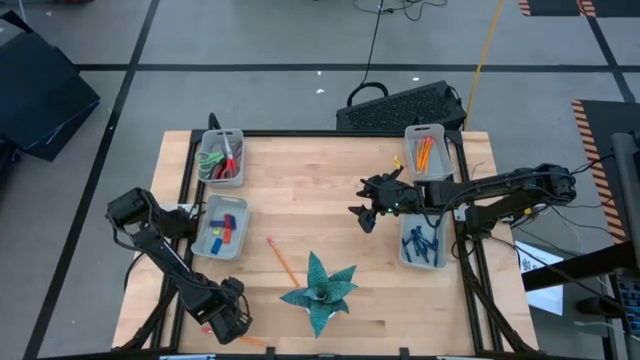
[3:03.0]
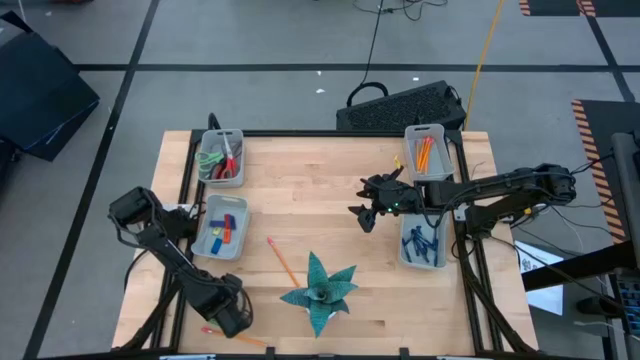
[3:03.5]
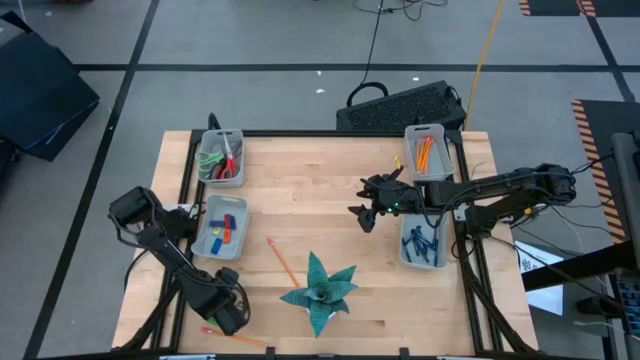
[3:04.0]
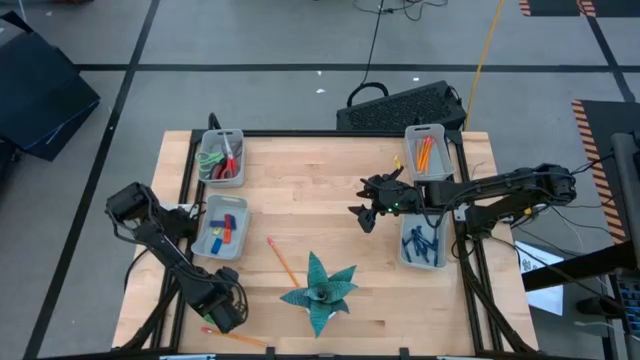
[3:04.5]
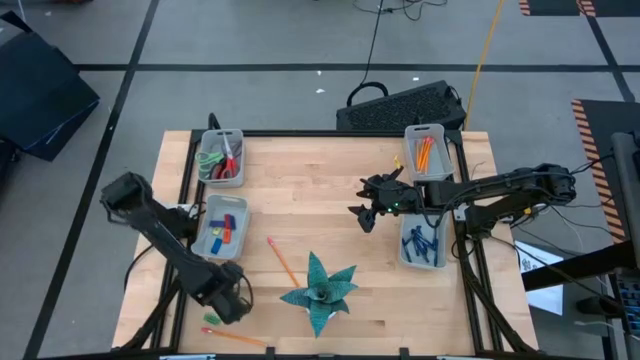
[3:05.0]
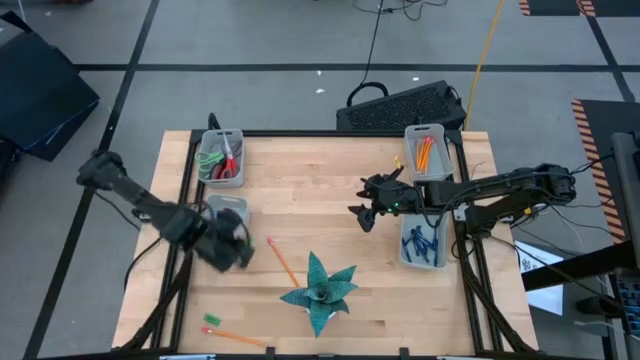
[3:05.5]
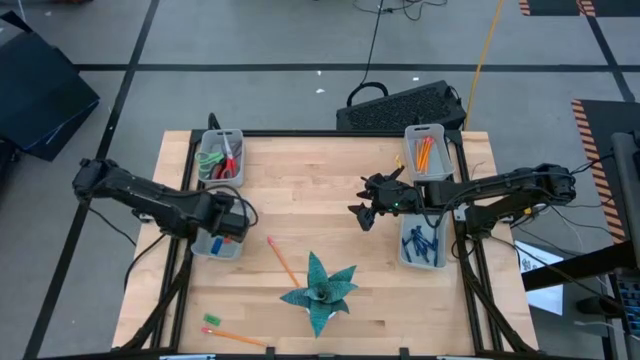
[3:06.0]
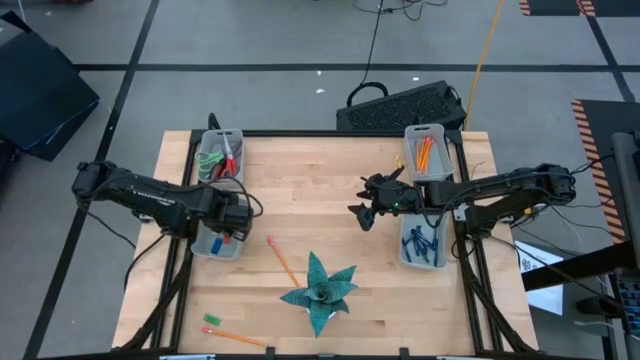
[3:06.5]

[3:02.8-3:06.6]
Task: Sort crayons/erasers/pens/pencils in bins
Put the top green eraser into the bottom left gray bin

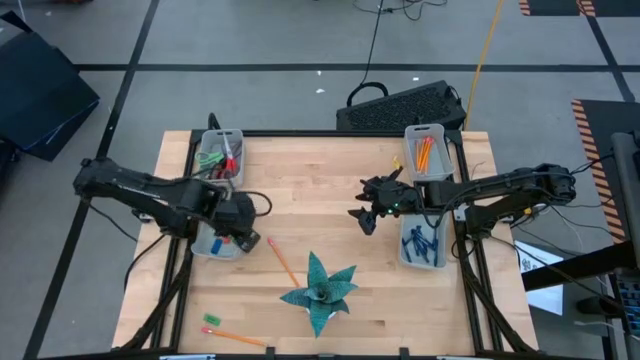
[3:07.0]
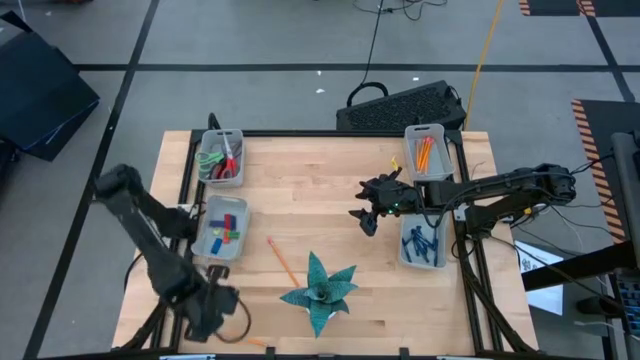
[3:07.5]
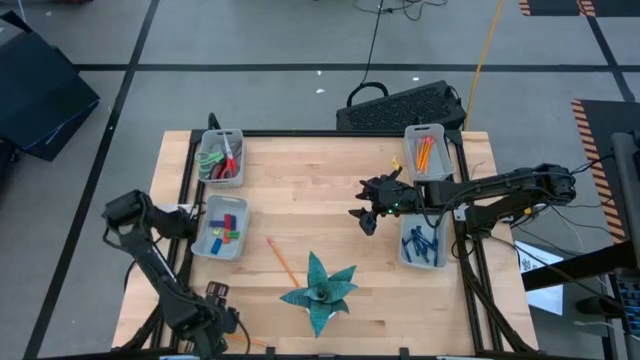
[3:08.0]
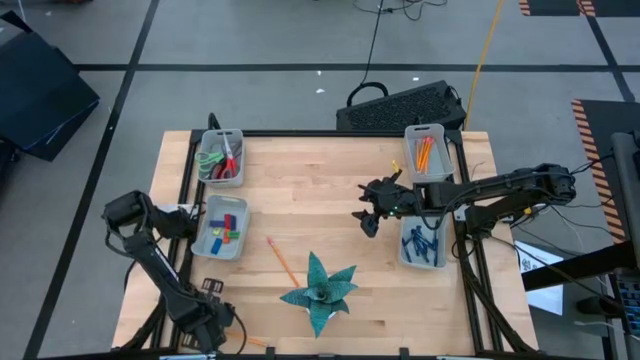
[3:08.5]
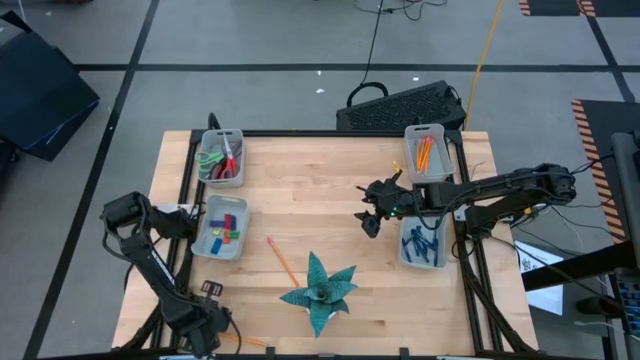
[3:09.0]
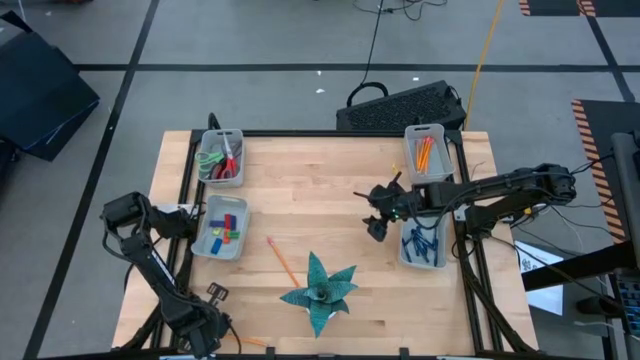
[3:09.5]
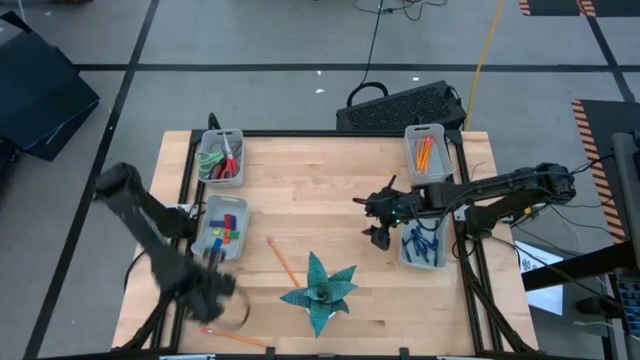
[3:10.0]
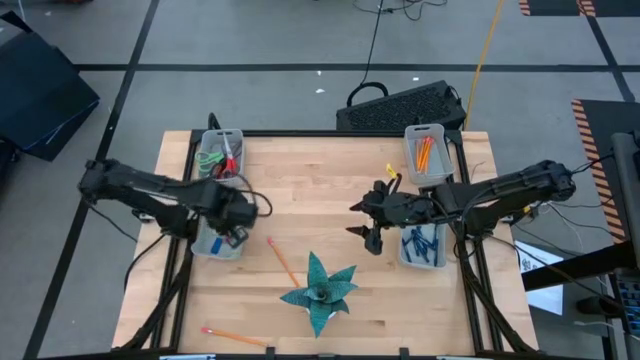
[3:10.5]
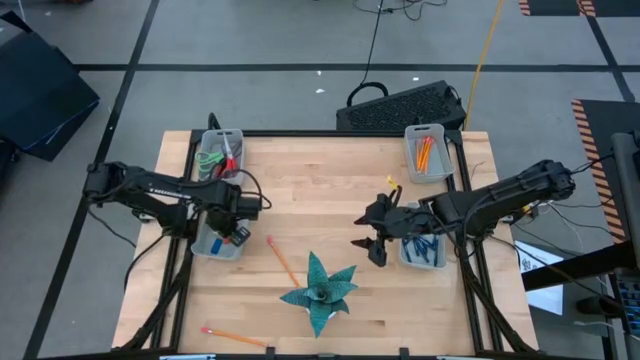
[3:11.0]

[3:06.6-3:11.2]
Put the green eraser into the bottom left gray bin

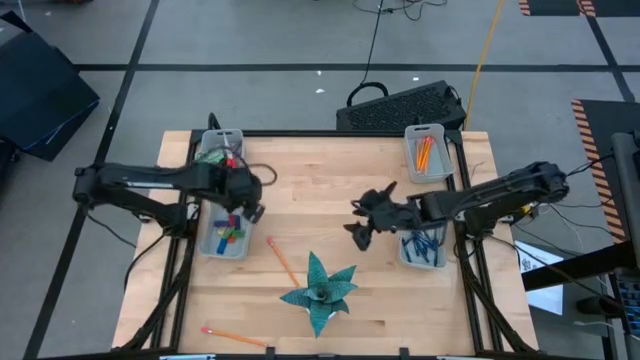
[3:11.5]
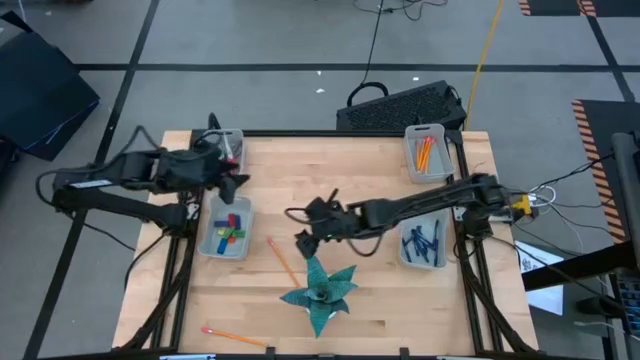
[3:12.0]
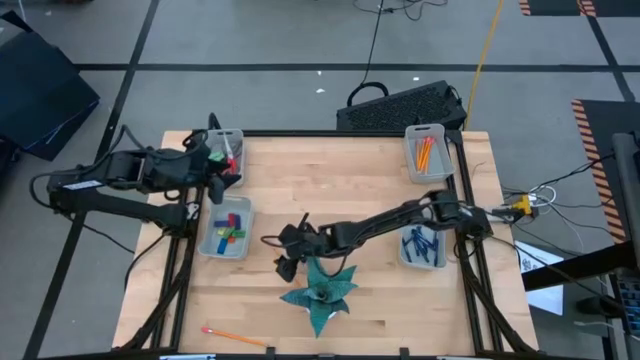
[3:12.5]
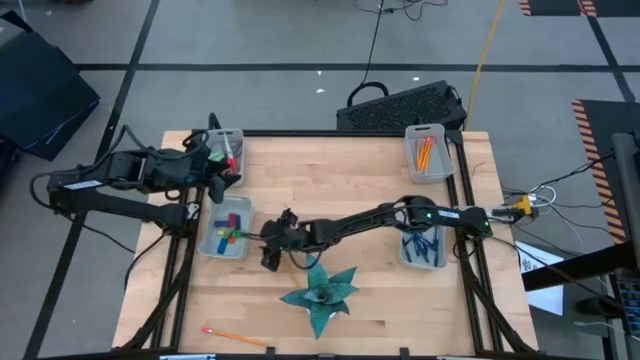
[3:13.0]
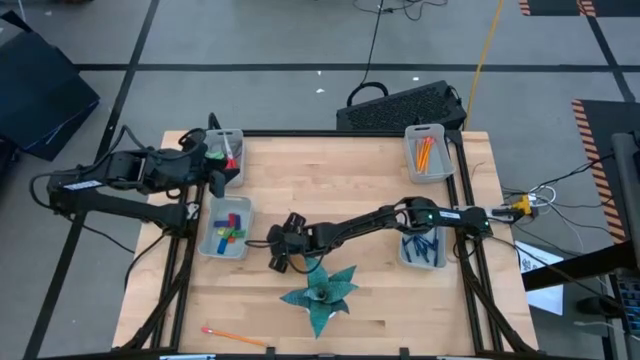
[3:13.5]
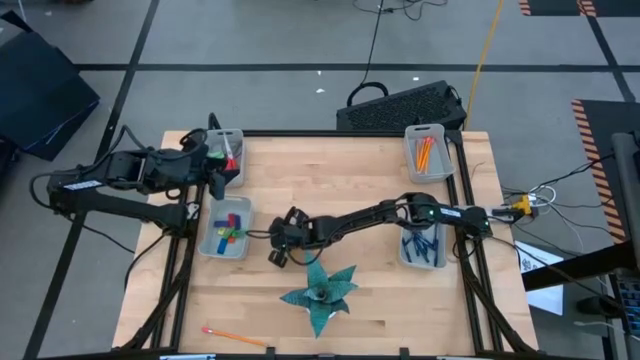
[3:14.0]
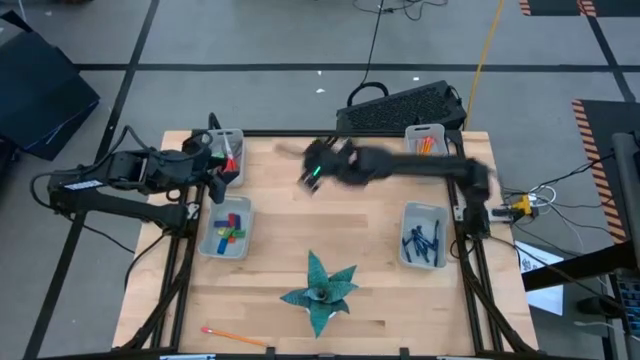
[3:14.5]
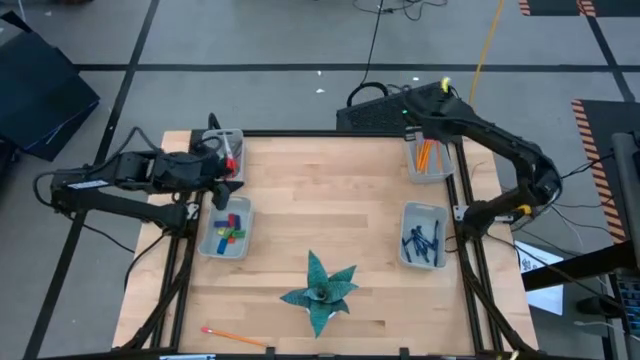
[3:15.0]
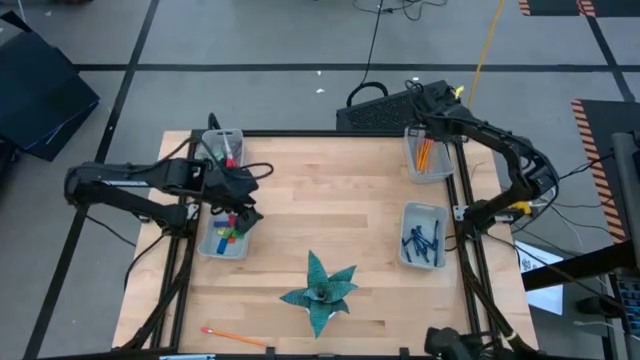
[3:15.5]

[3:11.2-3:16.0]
Put the top orange pencil into the top right gray bin

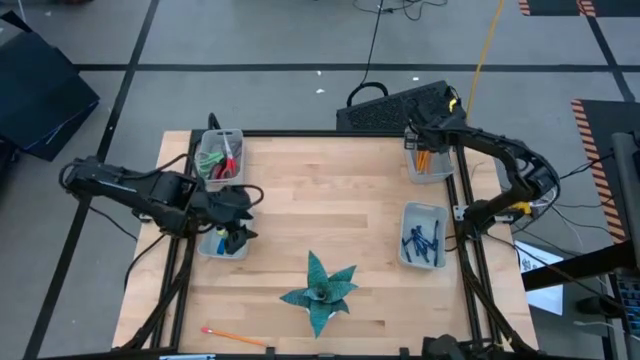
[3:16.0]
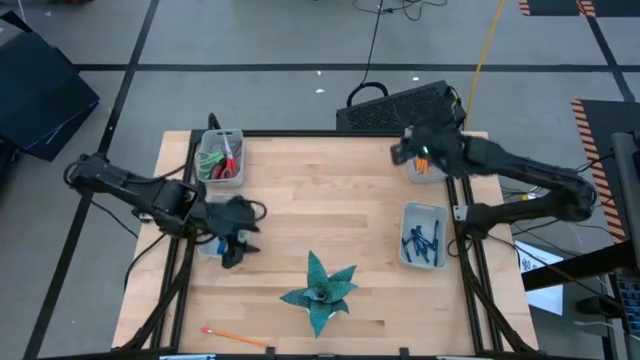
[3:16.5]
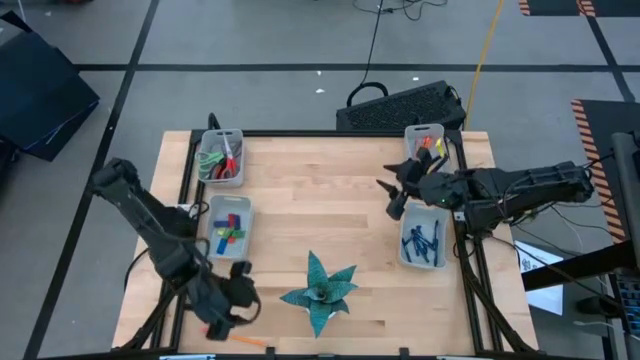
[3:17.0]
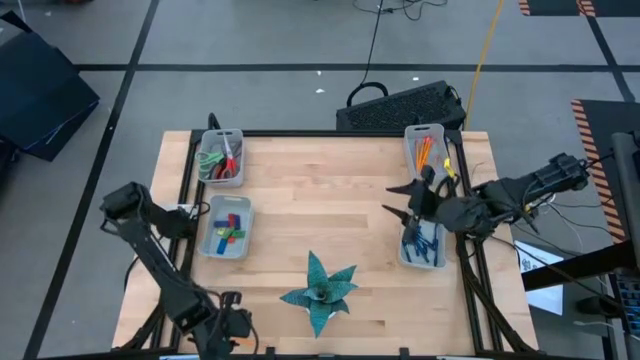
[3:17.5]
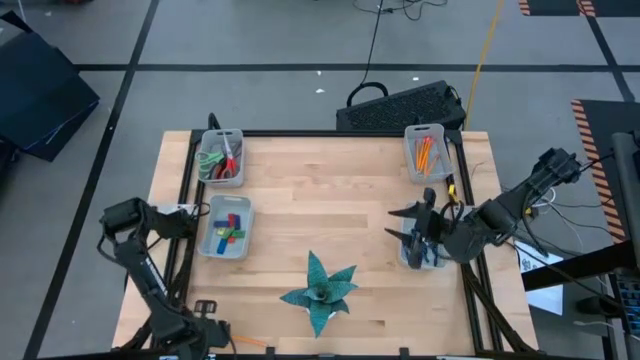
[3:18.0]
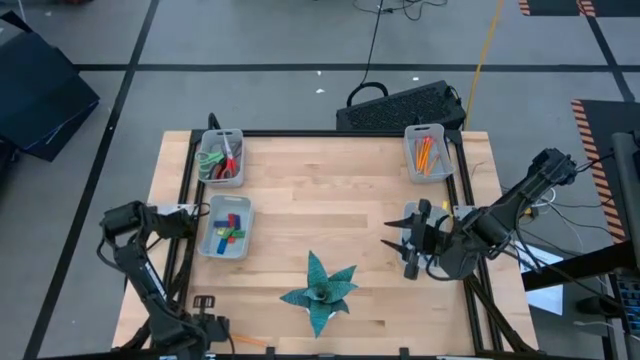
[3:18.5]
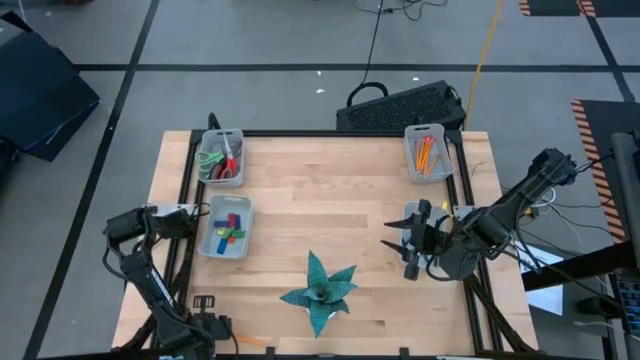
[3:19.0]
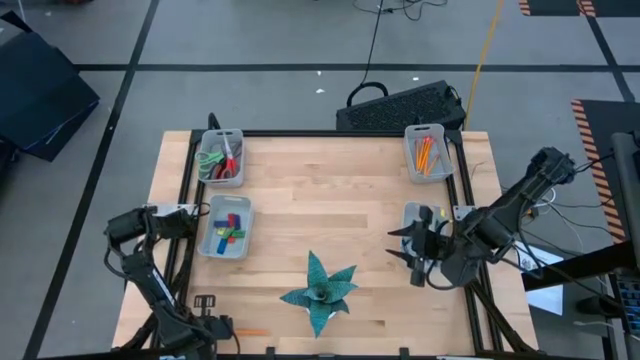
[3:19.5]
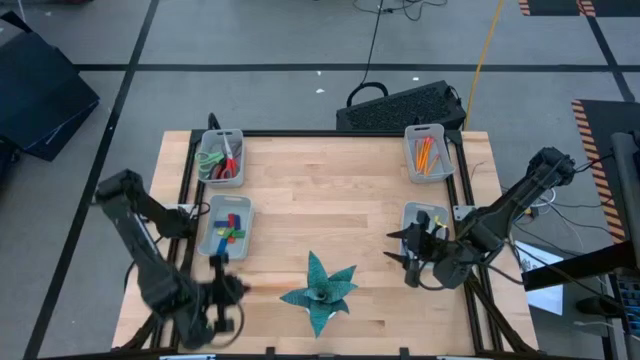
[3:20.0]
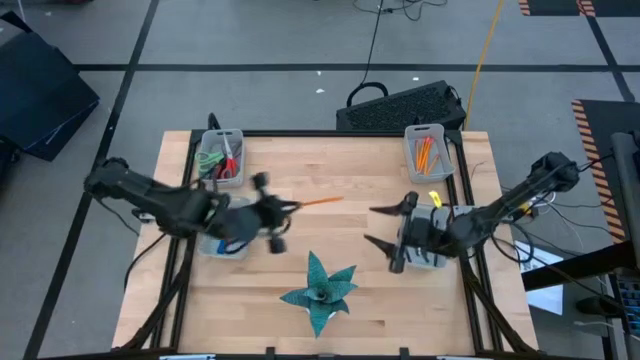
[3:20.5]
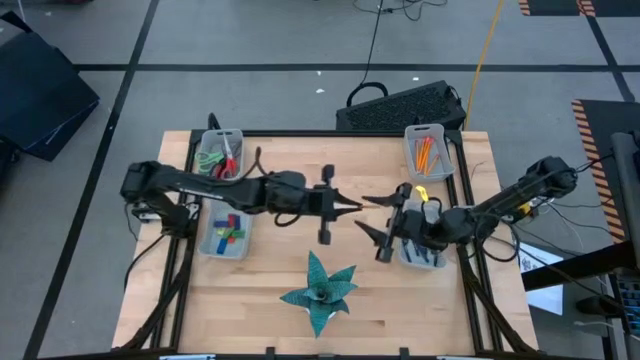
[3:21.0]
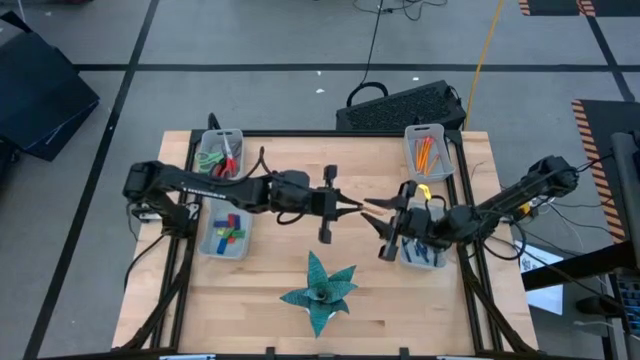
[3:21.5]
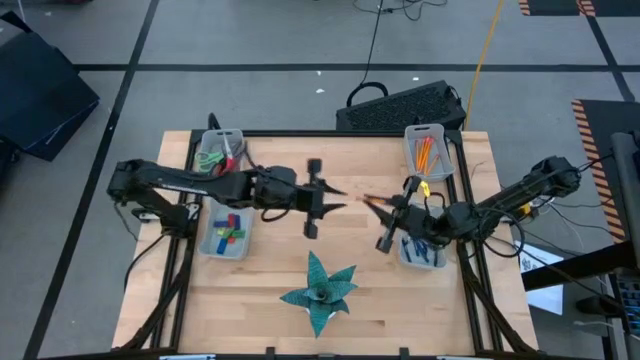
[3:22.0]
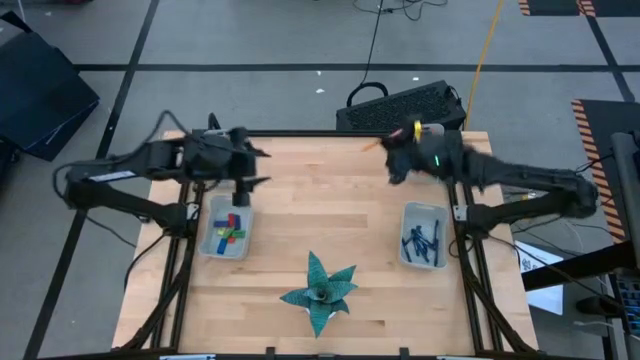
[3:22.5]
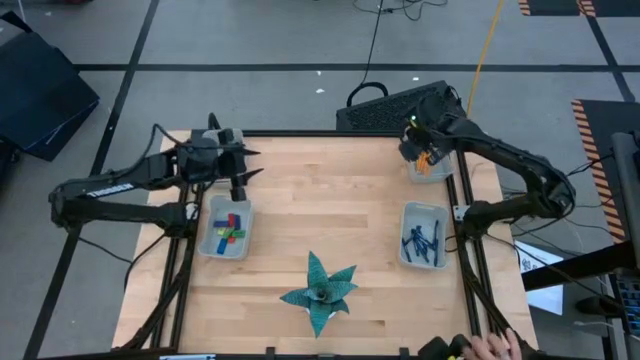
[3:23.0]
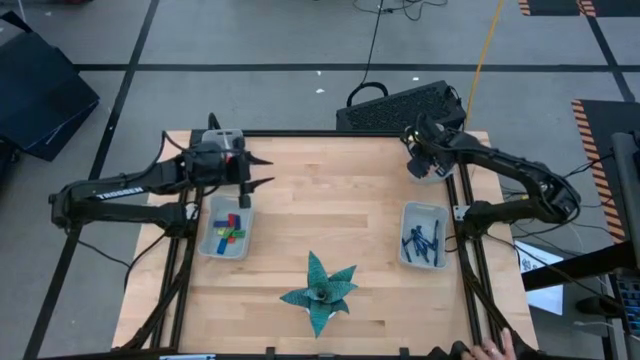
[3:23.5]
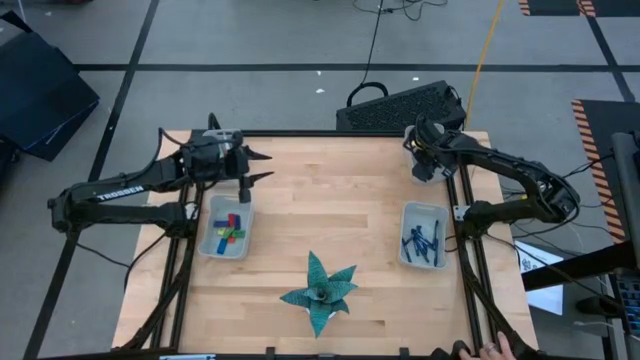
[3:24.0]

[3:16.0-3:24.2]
Put the orange pencil into the top right gray bin
